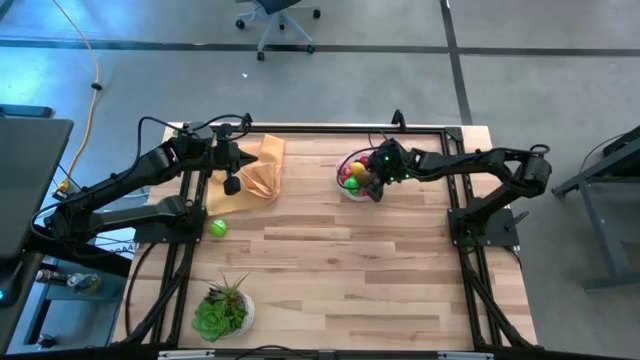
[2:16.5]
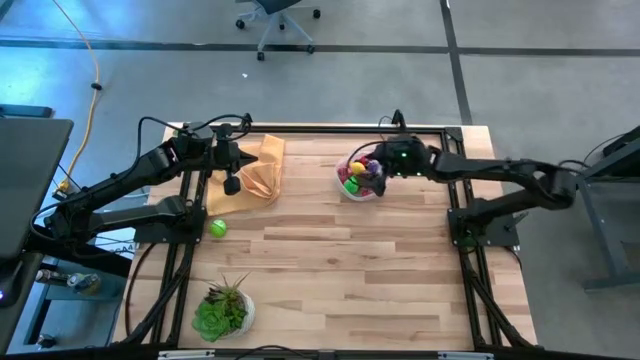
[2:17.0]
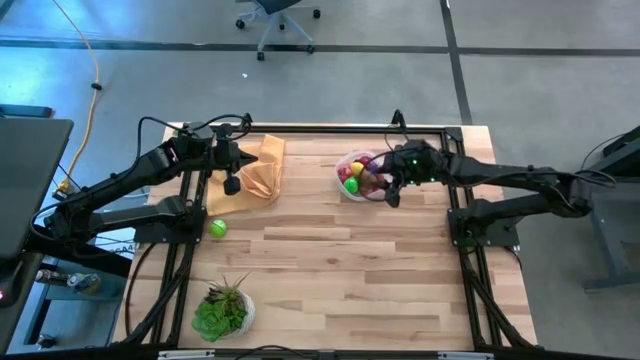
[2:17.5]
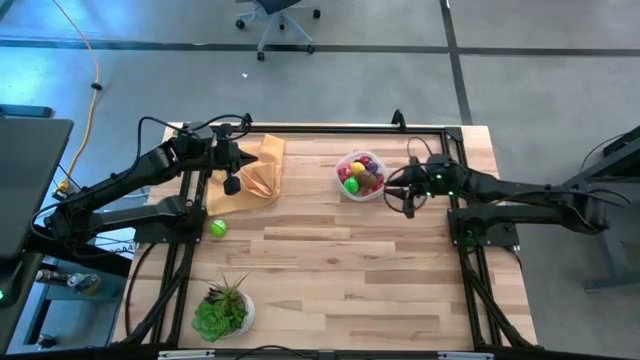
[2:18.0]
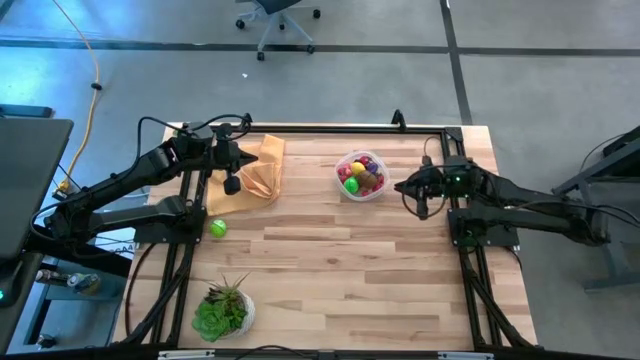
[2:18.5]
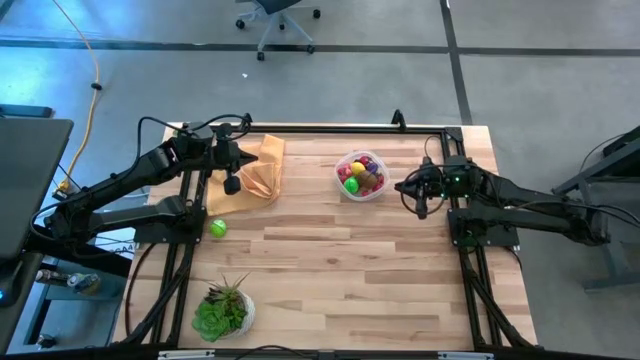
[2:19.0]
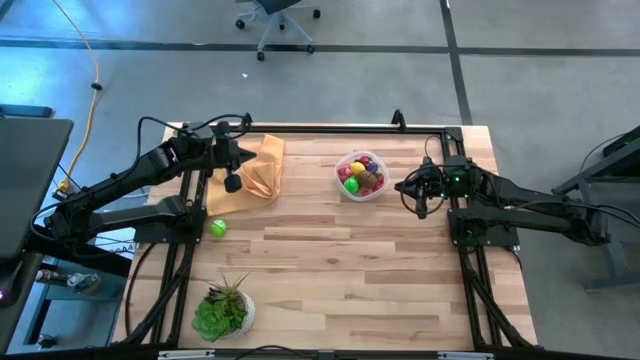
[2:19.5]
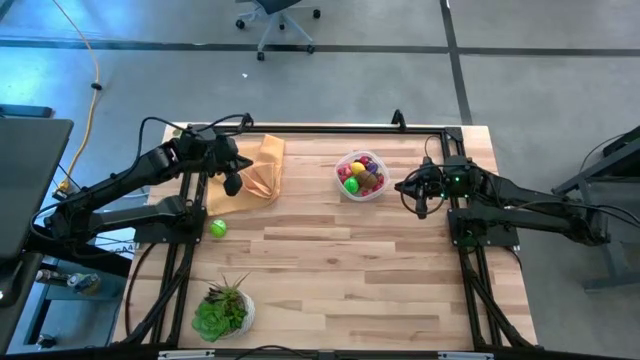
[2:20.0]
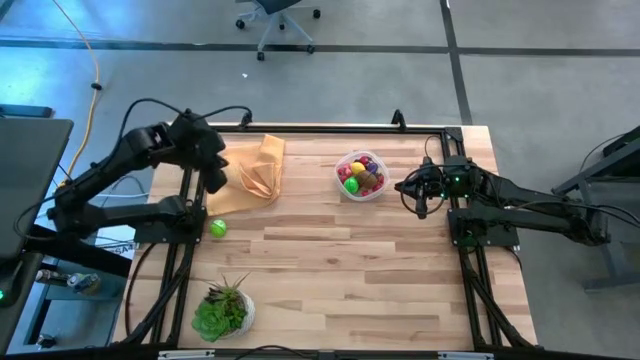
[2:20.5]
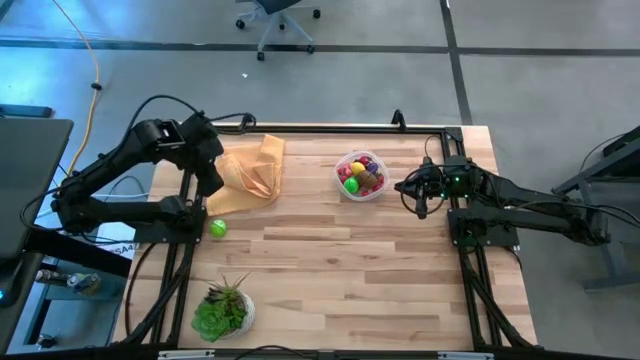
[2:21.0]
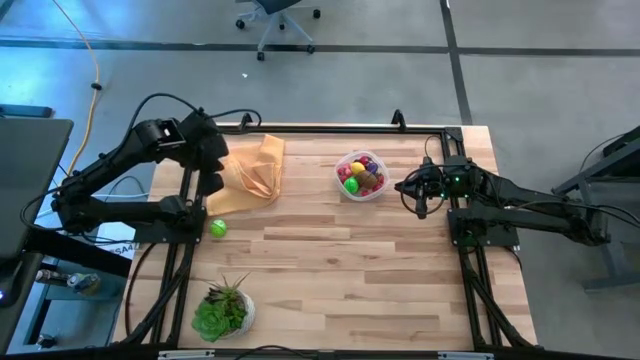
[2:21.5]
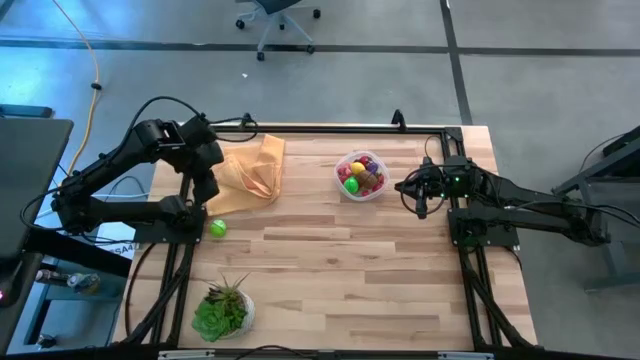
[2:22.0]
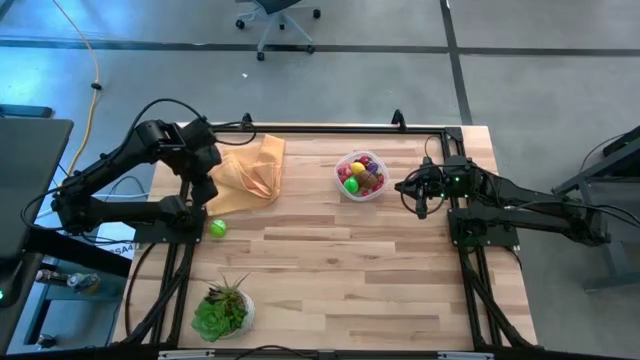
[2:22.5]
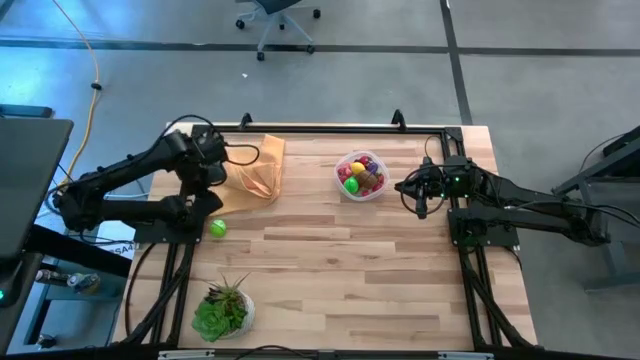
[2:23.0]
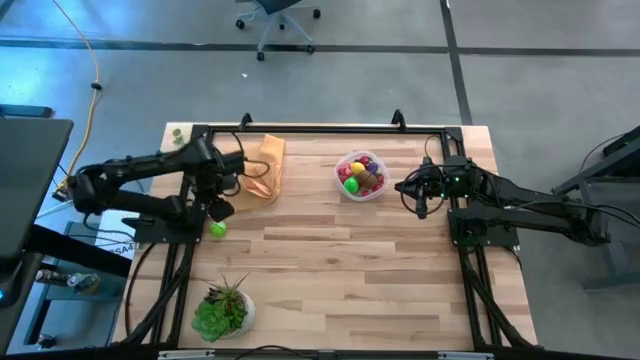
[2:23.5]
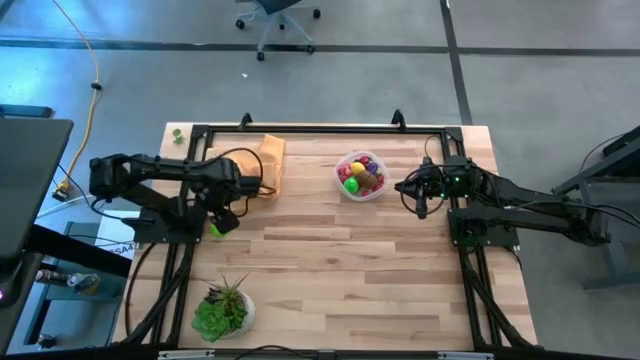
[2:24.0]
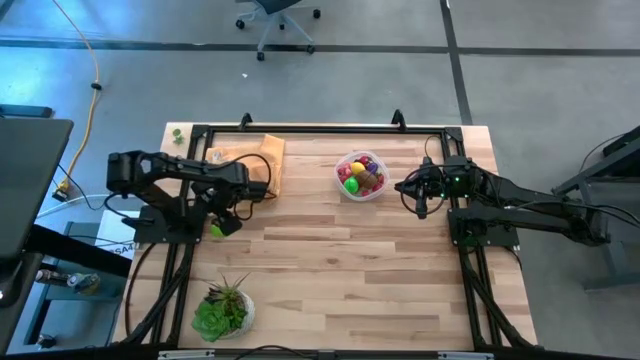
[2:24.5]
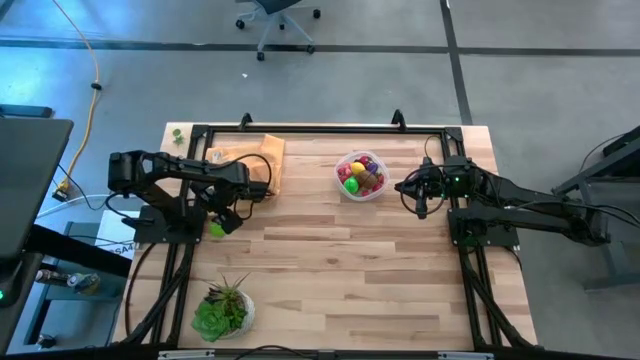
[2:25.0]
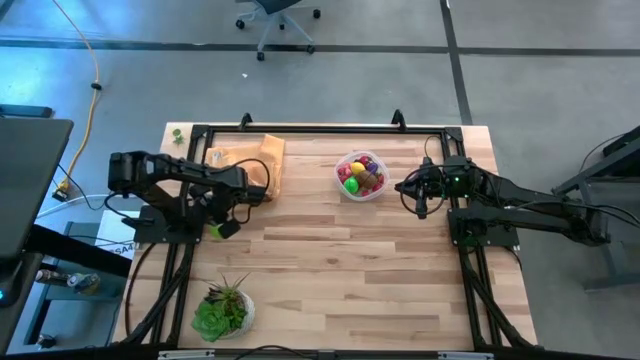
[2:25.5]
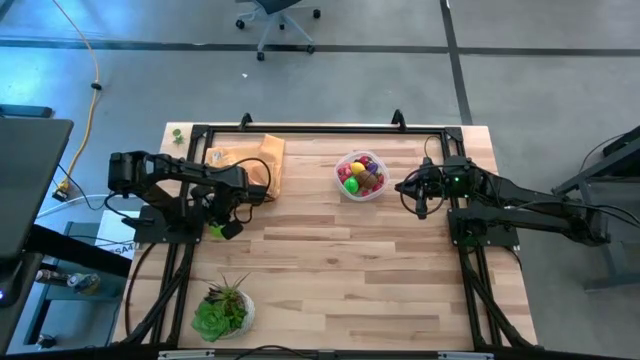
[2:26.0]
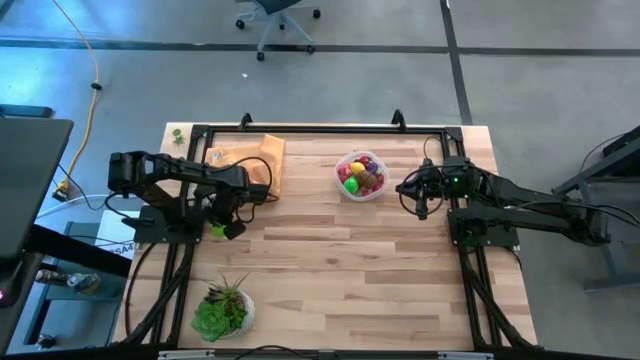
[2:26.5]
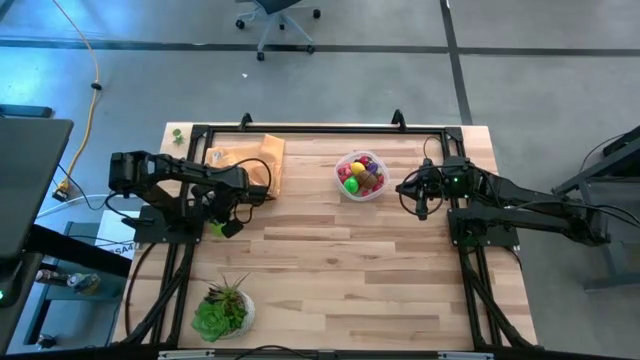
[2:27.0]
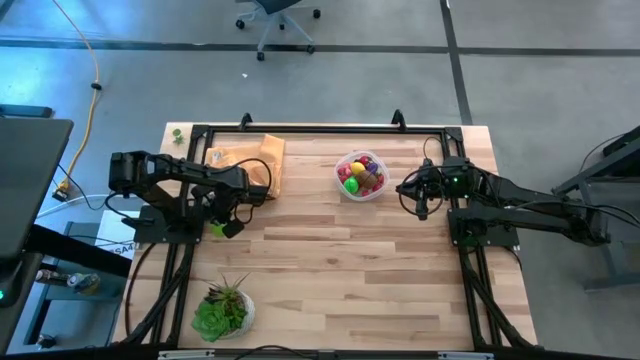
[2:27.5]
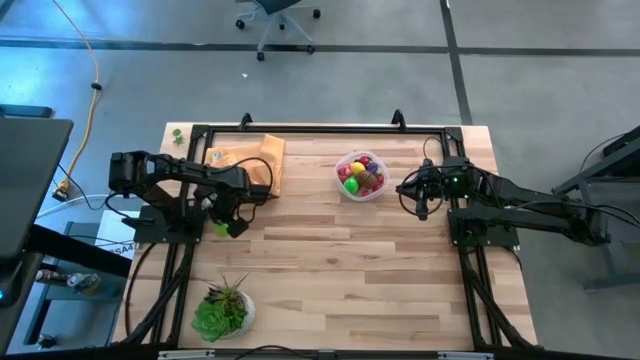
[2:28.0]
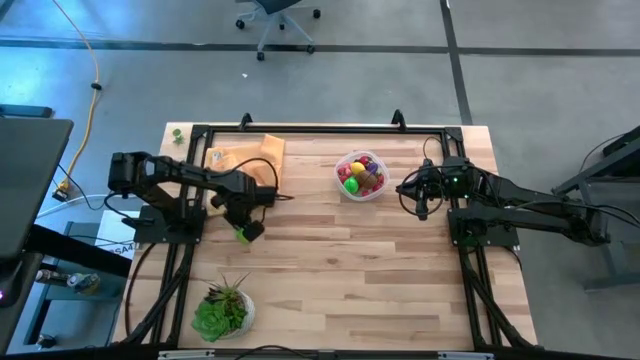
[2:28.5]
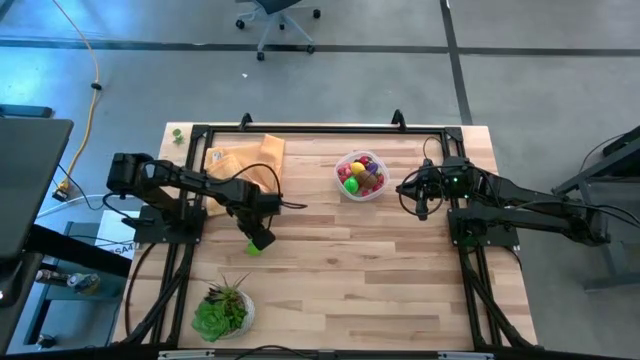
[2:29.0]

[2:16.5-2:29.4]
Task: Pick and placing Produce into tupperware
Put the green cabbage into the transparent container

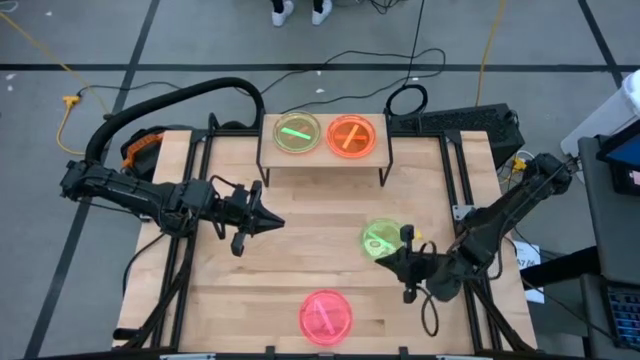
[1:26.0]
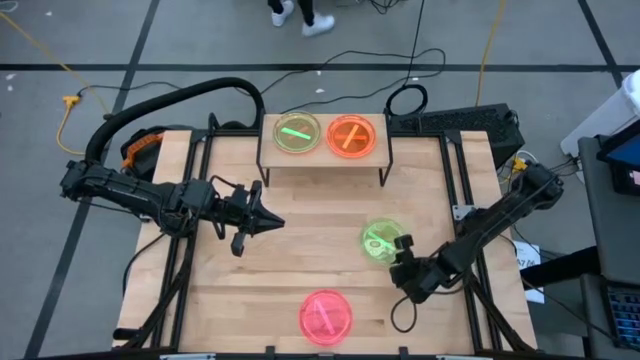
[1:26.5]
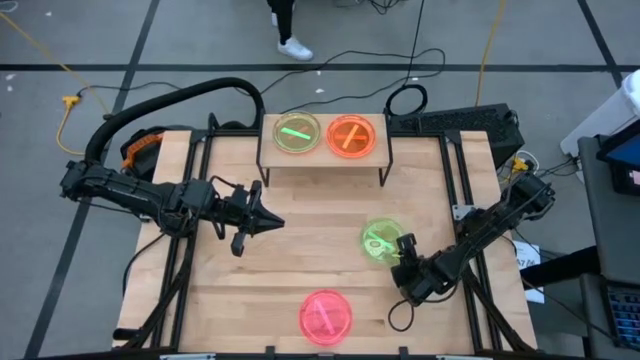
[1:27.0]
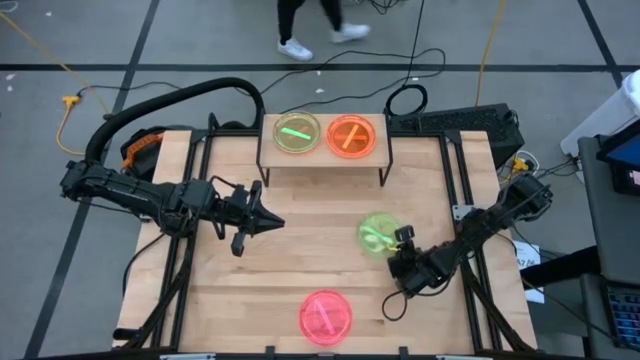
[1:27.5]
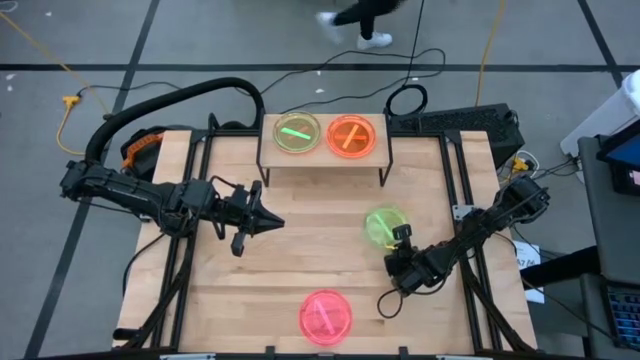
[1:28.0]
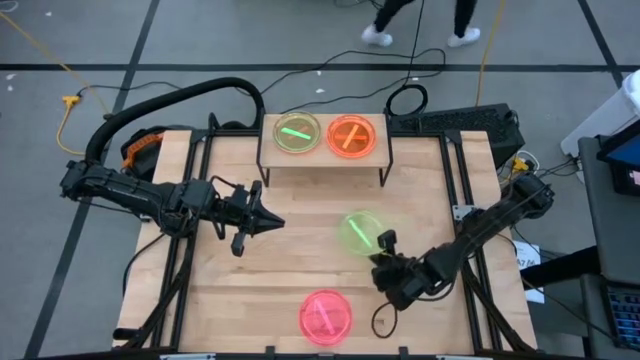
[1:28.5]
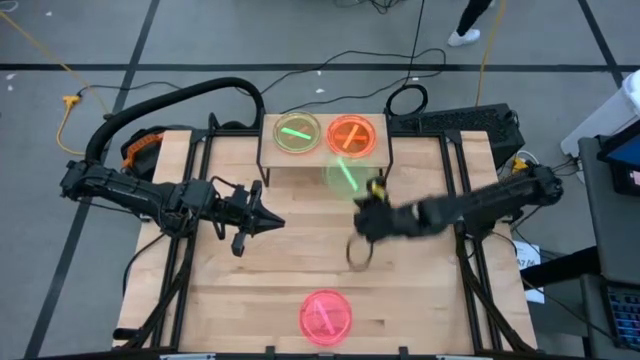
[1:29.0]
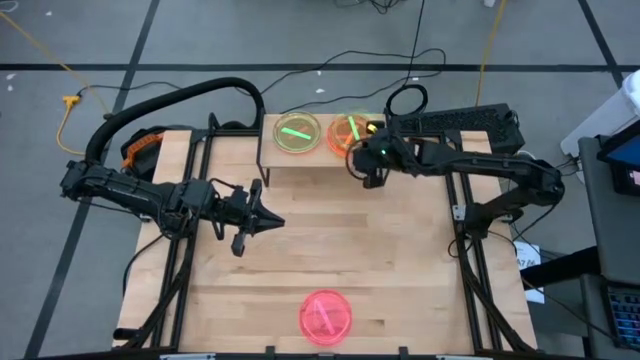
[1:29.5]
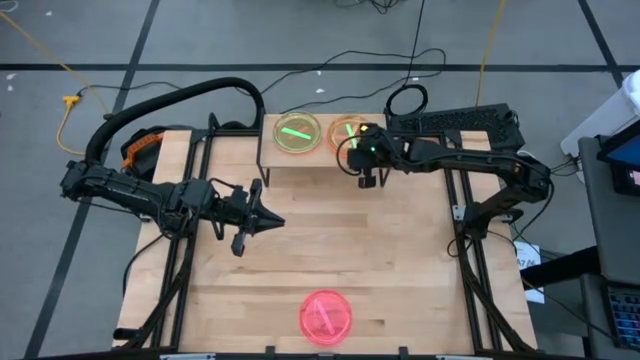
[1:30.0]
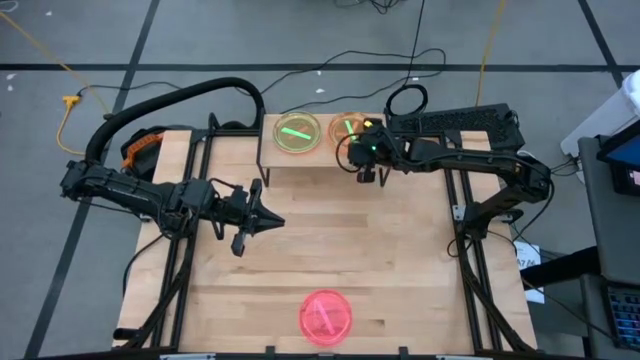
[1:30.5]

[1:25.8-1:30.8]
Task: Place and stack plates onto a shelf
Stack the green plate on top of the orange plate on the shelf
